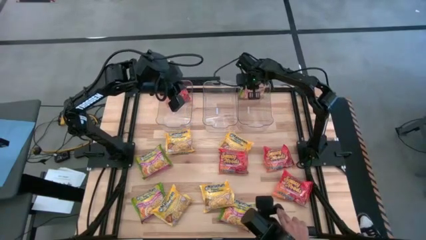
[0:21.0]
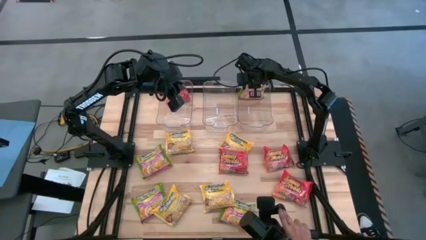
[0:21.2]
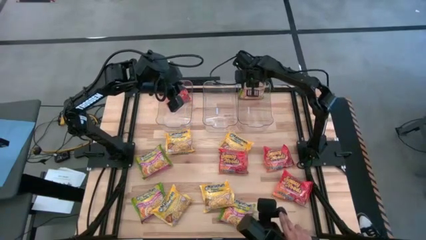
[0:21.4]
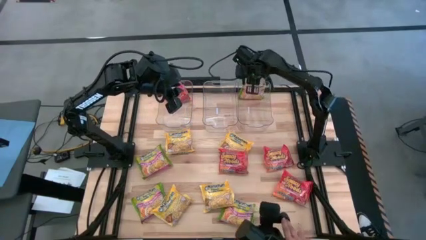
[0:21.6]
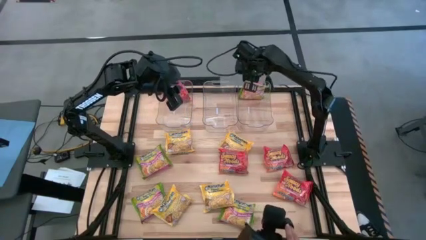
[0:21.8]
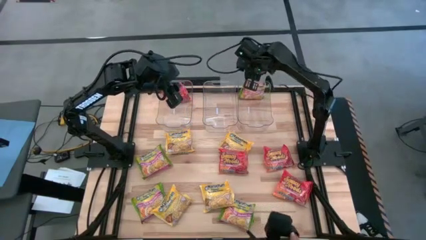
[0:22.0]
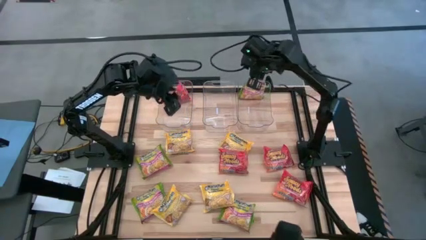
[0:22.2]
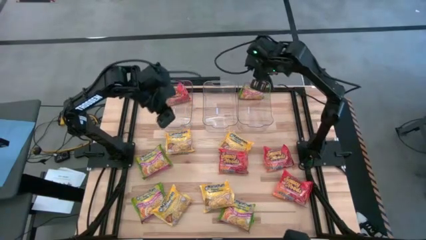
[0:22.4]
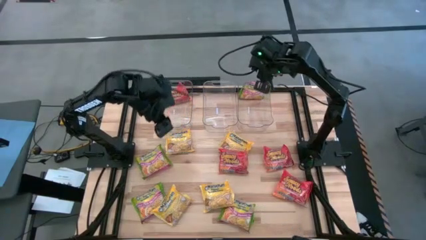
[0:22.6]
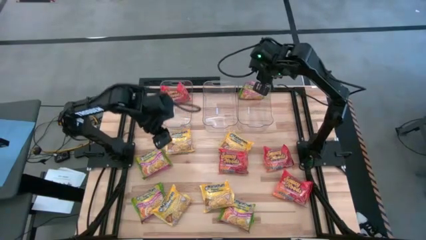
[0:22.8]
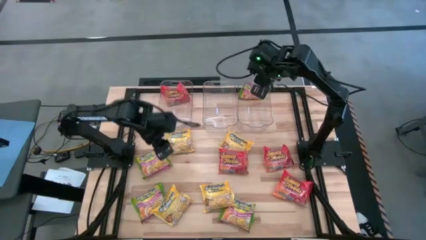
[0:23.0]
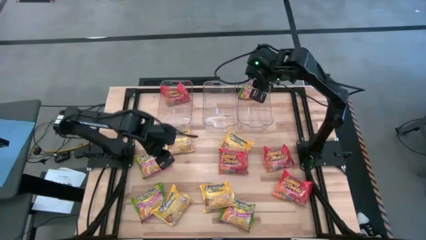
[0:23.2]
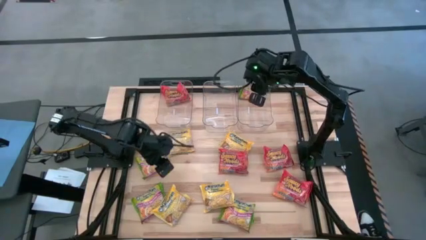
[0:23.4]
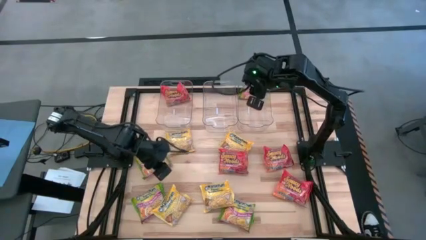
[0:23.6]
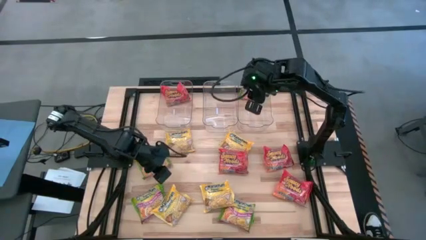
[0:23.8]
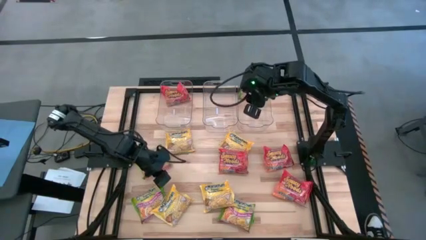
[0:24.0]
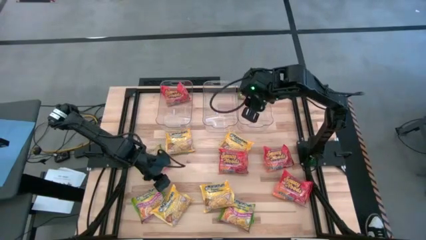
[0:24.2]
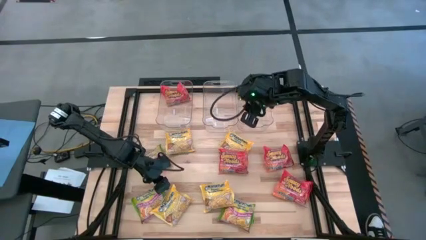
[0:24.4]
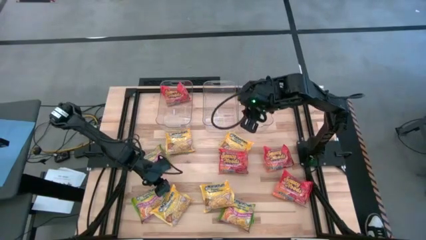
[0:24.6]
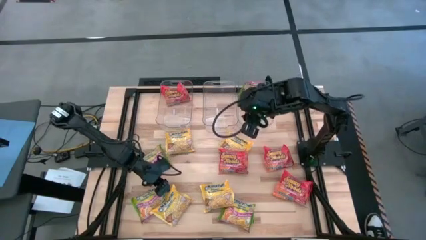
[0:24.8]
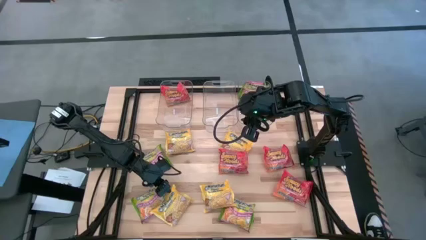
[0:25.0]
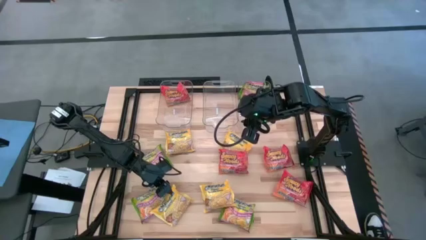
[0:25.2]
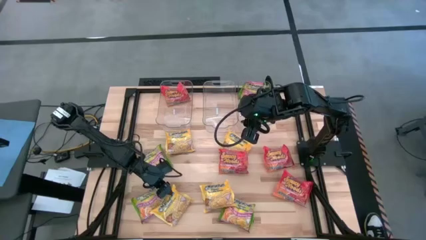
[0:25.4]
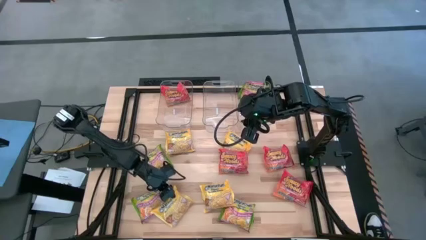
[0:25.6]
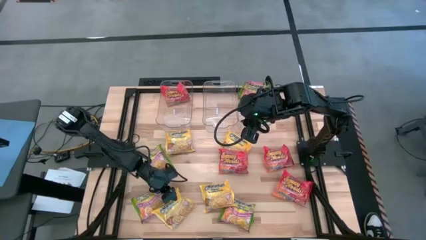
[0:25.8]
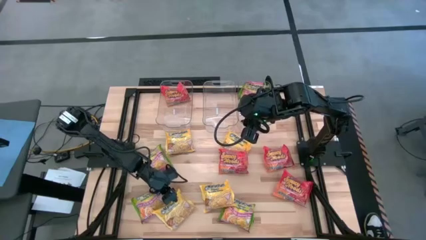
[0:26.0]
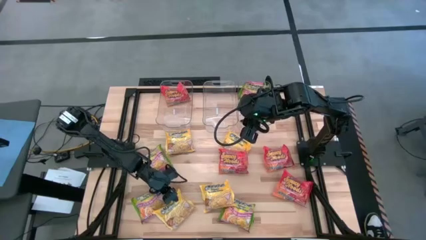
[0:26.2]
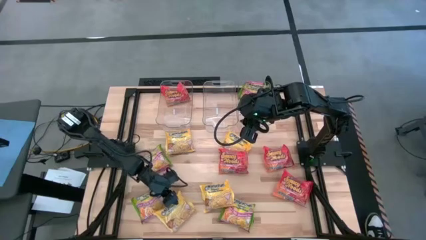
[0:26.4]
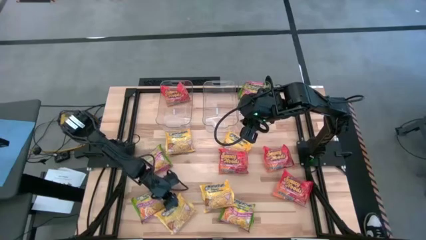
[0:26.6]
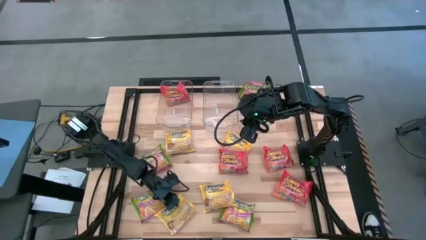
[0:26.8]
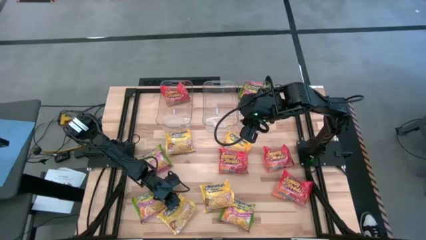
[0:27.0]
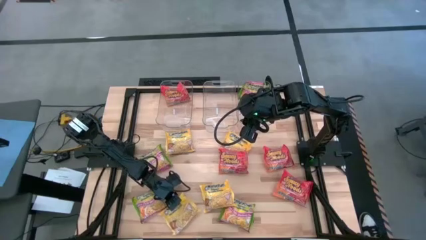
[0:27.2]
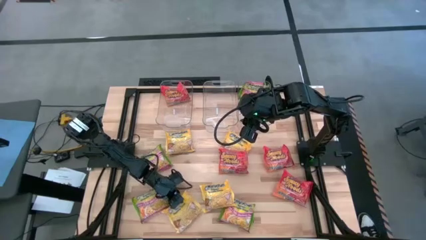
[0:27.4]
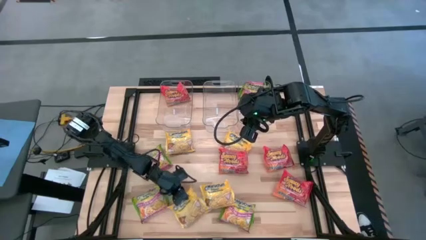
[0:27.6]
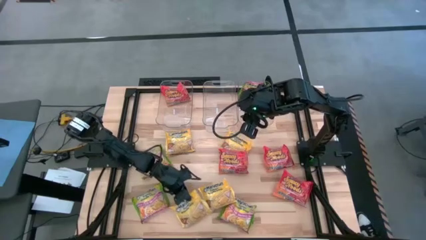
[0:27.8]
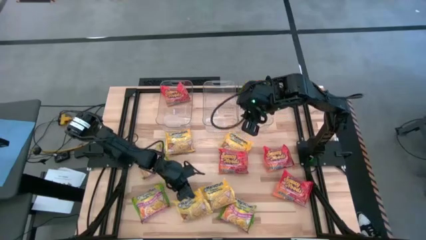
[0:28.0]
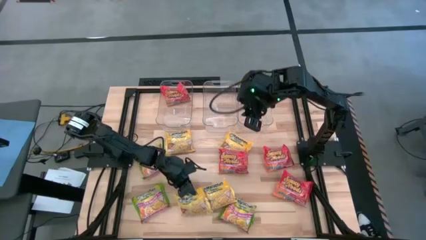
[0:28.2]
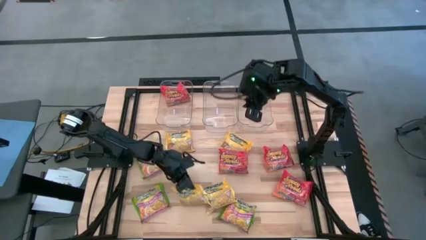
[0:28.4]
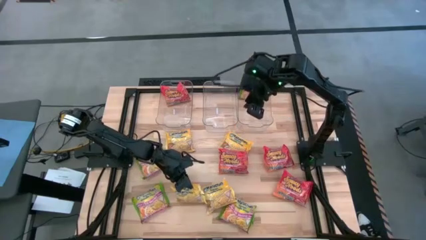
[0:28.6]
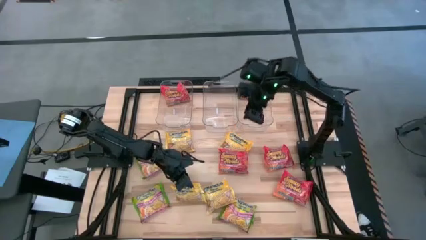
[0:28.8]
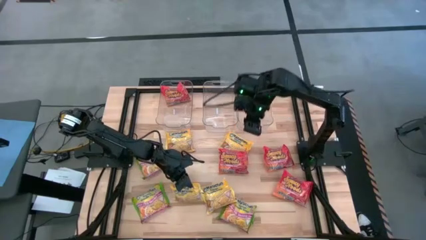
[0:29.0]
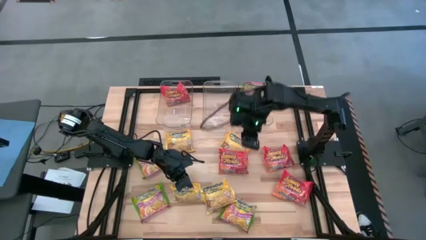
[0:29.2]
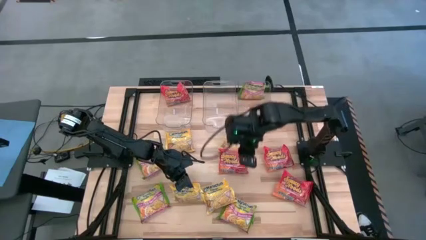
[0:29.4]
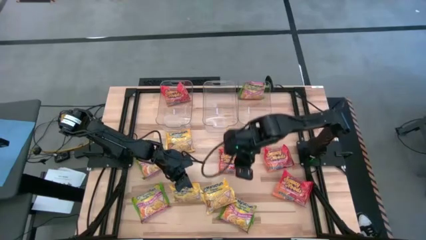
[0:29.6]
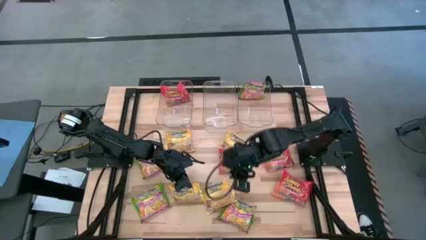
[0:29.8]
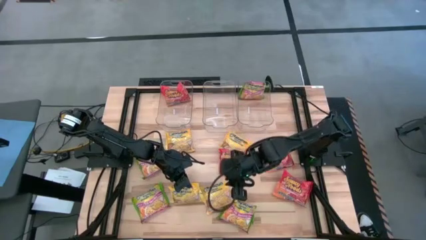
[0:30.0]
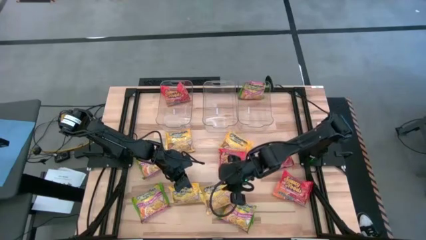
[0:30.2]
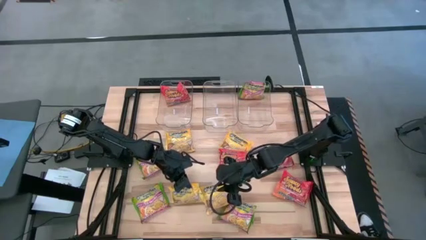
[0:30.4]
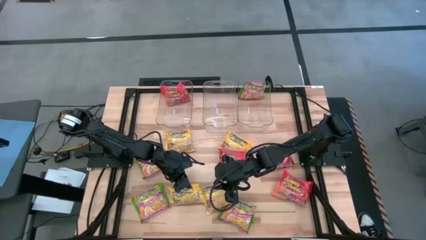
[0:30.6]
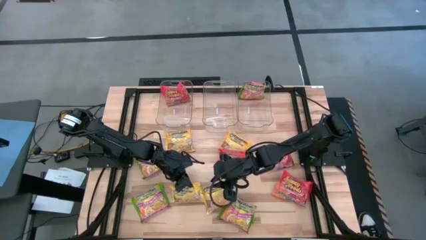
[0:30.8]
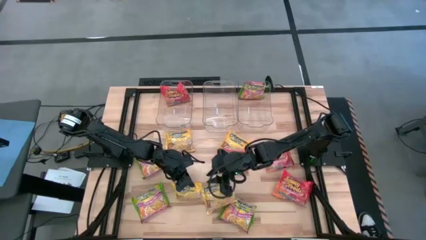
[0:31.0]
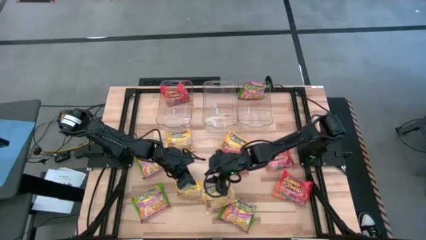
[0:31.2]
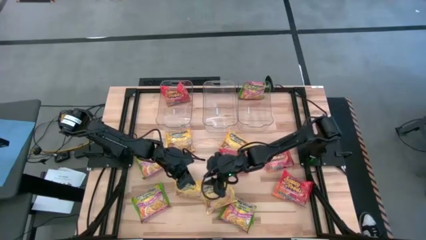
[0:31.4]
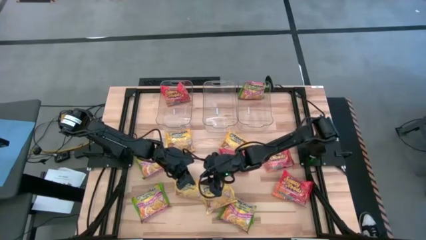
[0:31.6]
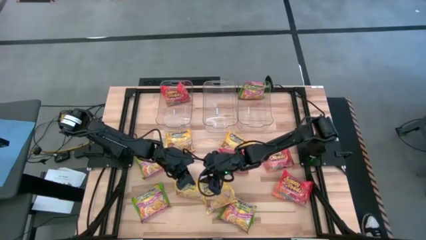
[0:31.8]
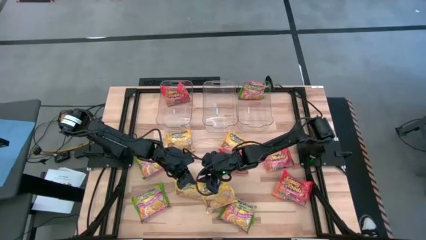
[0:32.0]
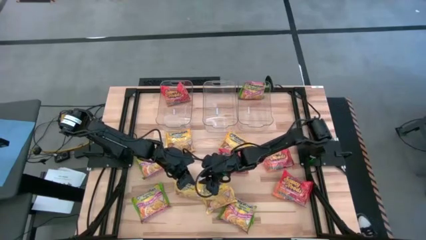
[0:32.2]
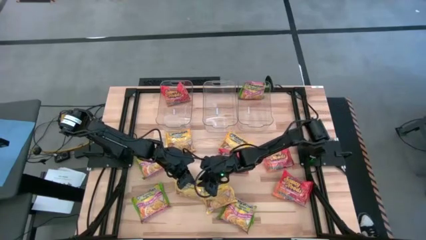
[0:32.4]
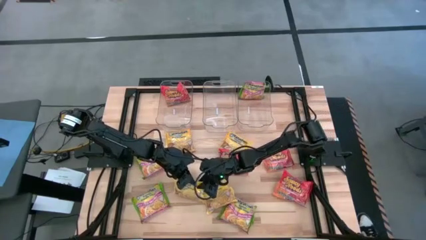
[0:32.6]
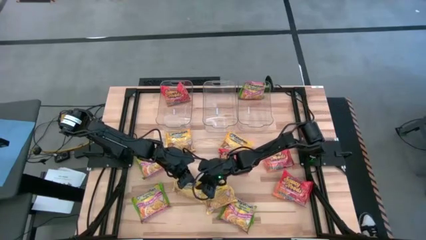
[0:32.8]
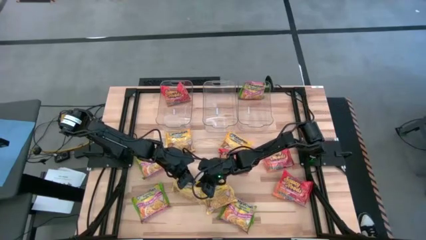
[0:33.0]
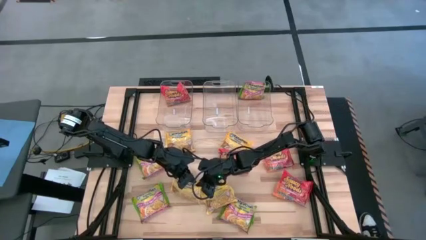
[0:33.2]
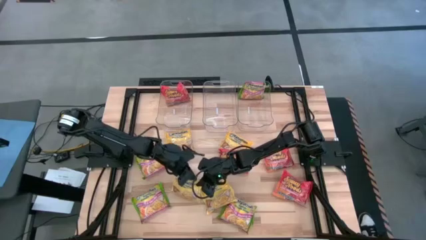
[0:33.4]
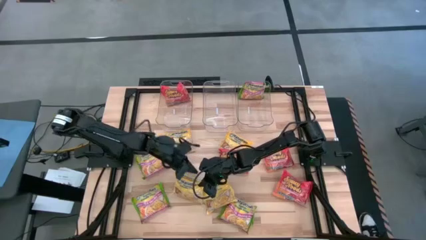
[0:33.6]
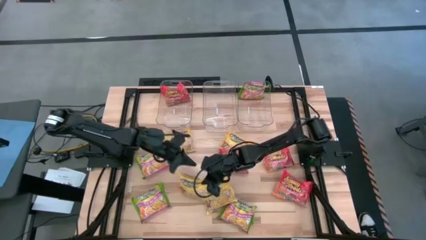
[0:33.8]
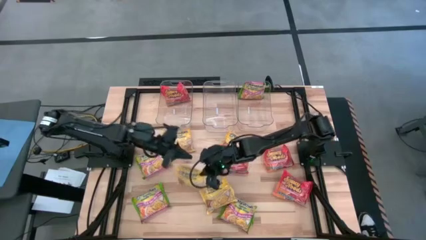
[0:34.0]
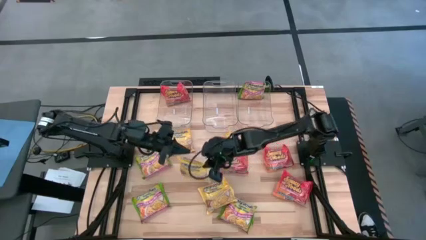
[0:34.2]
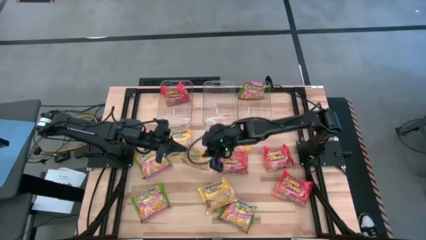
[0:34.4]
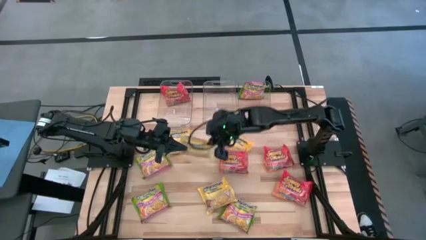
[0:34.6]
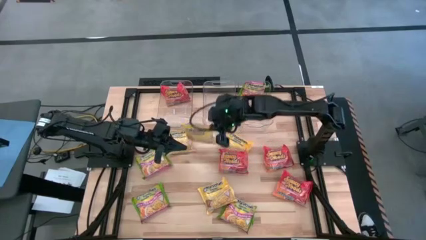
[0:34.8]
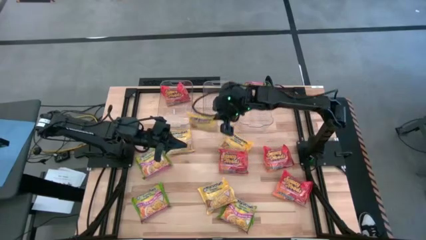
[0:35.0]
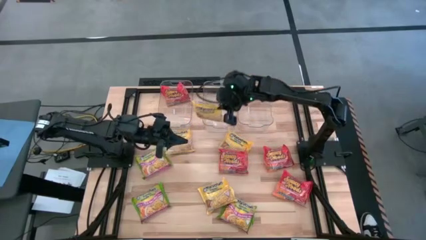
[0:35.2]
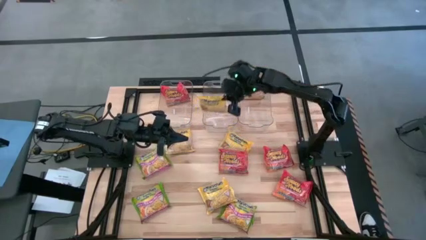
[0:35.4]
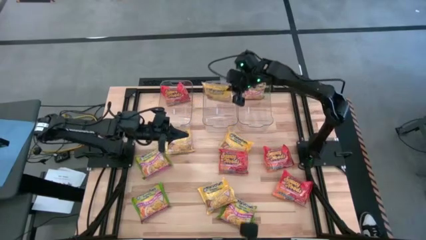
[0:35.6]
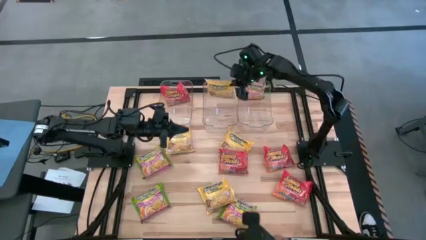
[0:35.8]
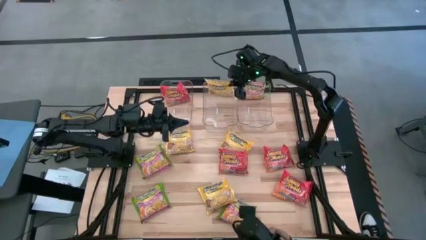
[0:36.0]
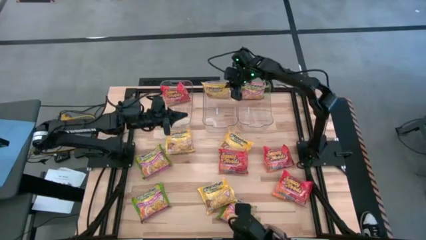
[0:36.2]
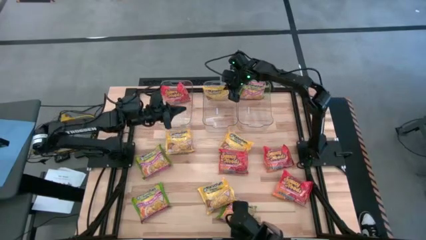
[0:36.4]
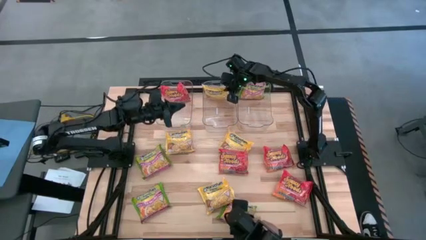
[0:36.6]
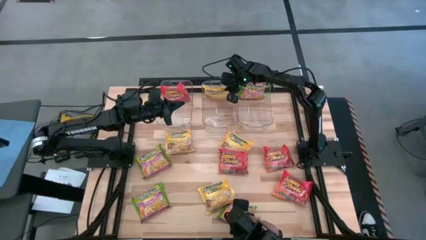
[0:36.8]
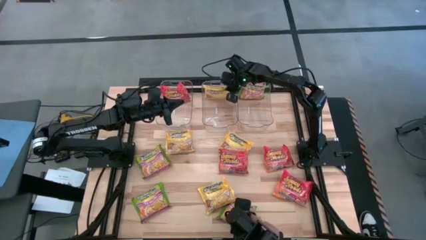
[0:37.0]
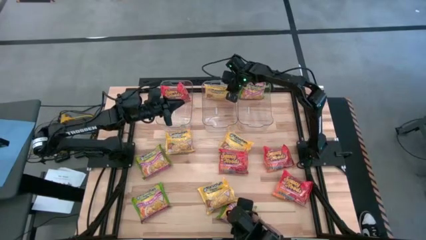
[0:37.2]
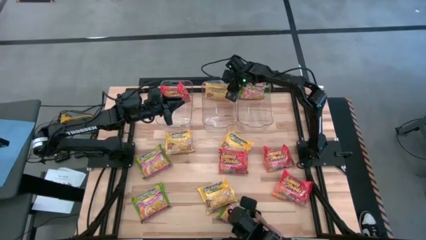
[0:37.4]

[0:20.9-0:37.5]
Task: Sort Maruchan noodles
Put the yellow noodle pack into the middle transparent bin
